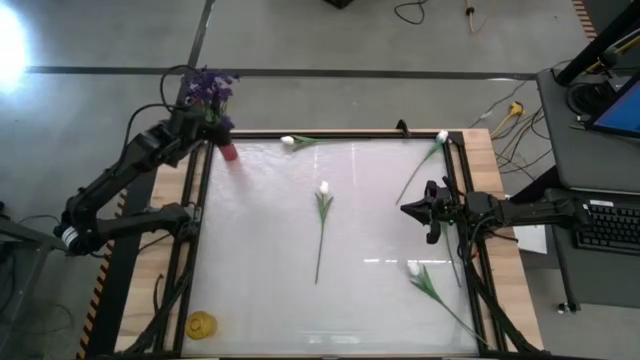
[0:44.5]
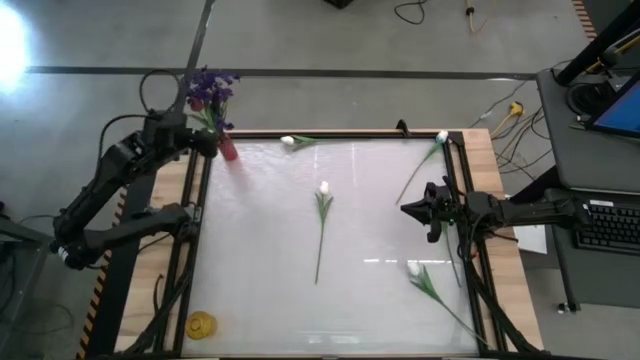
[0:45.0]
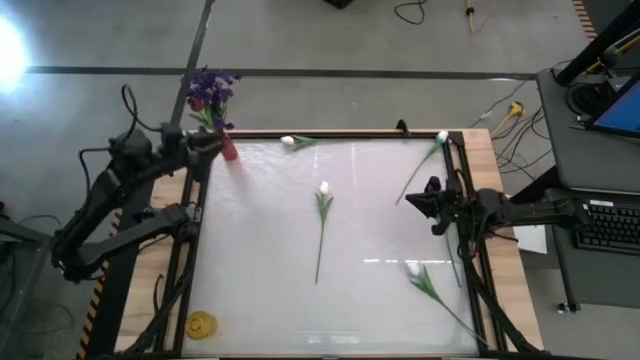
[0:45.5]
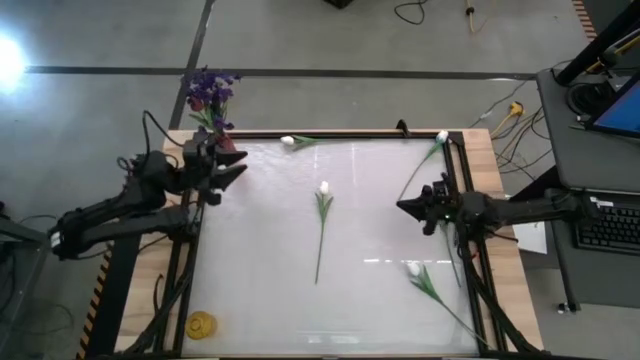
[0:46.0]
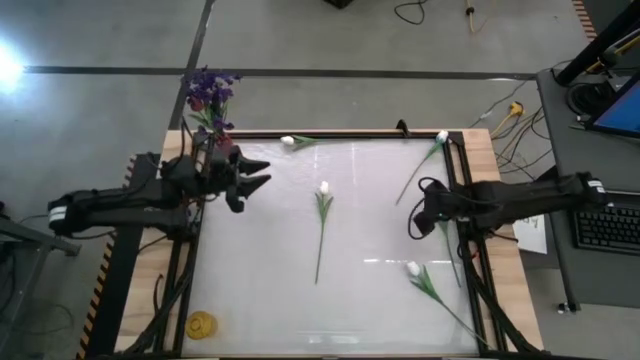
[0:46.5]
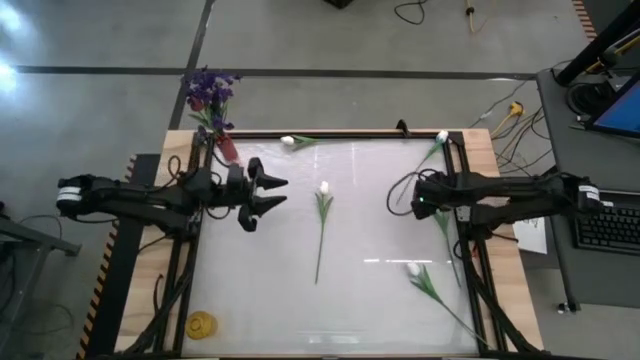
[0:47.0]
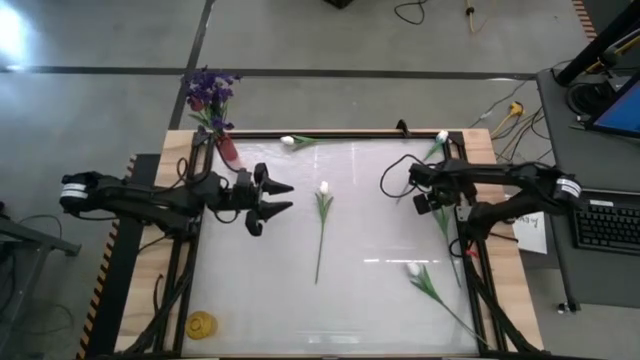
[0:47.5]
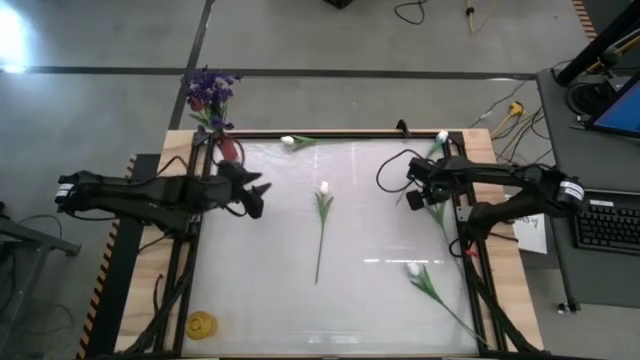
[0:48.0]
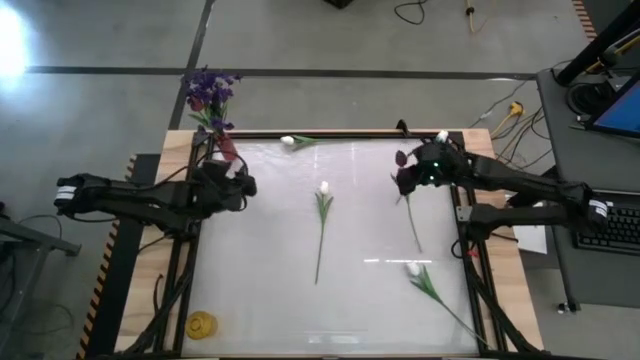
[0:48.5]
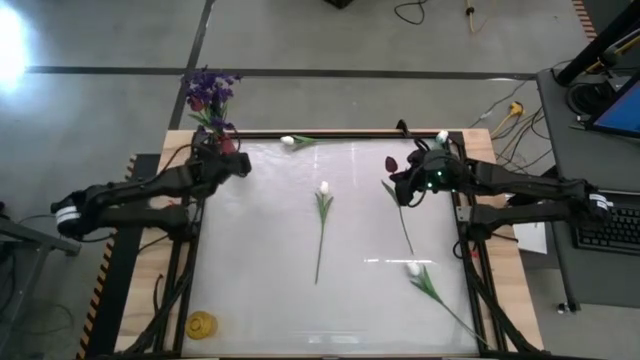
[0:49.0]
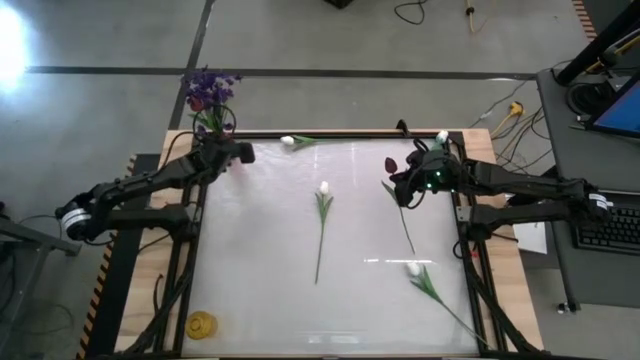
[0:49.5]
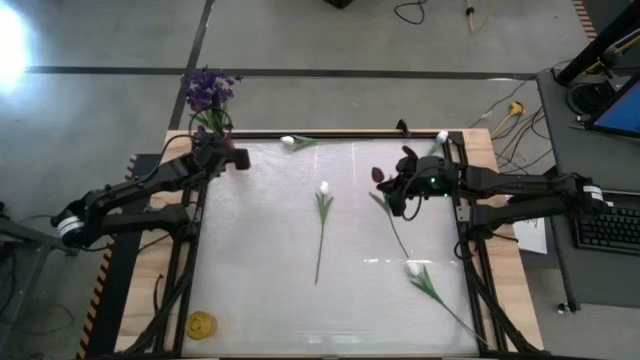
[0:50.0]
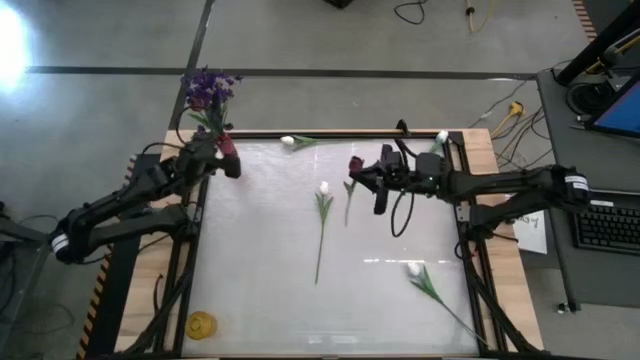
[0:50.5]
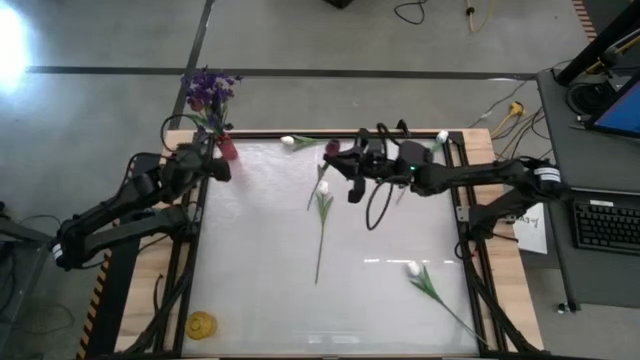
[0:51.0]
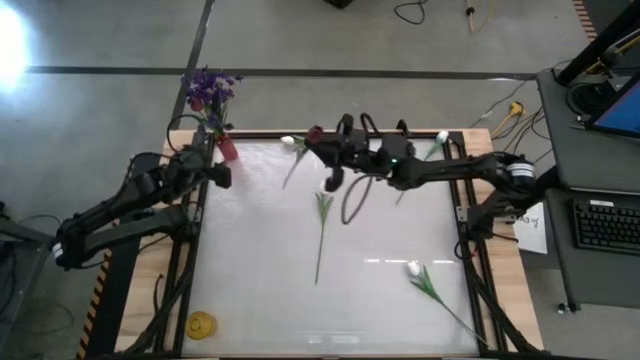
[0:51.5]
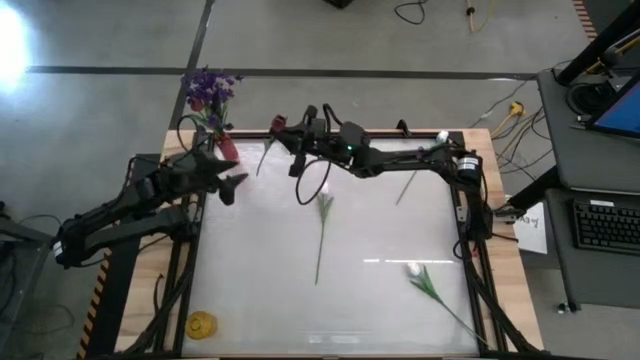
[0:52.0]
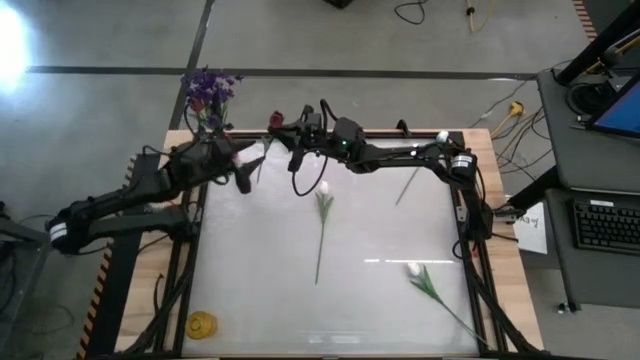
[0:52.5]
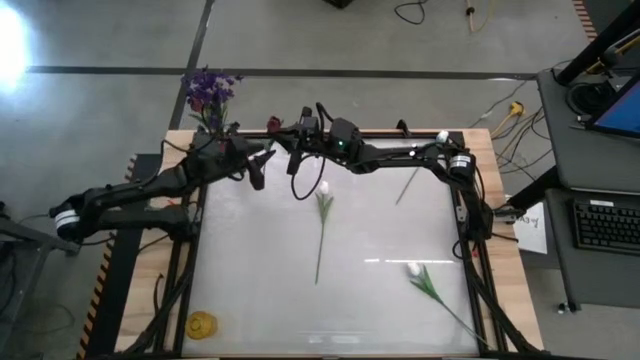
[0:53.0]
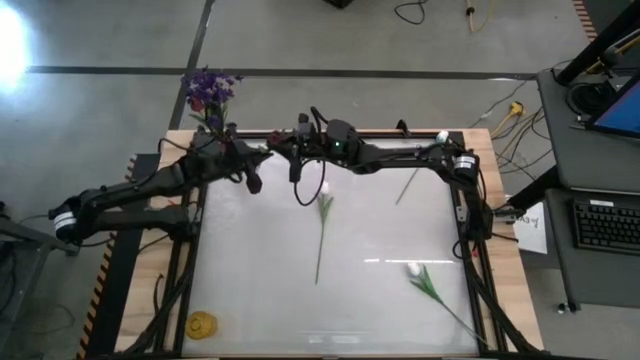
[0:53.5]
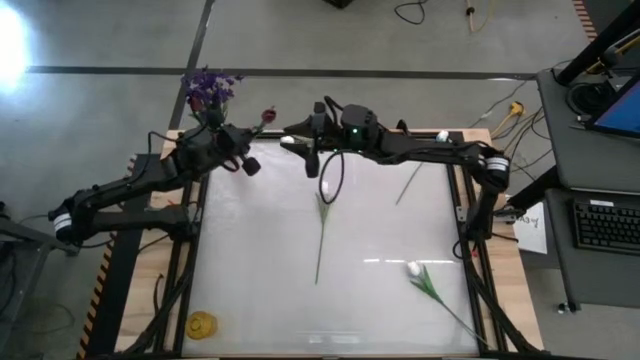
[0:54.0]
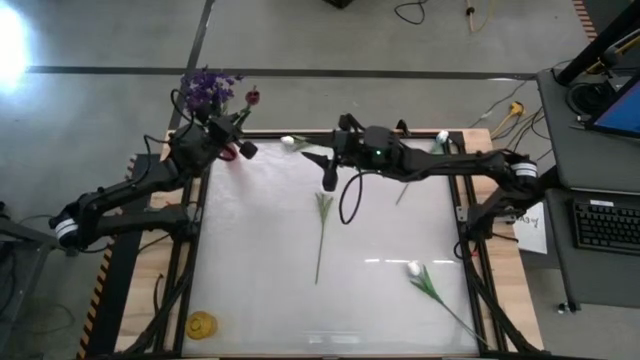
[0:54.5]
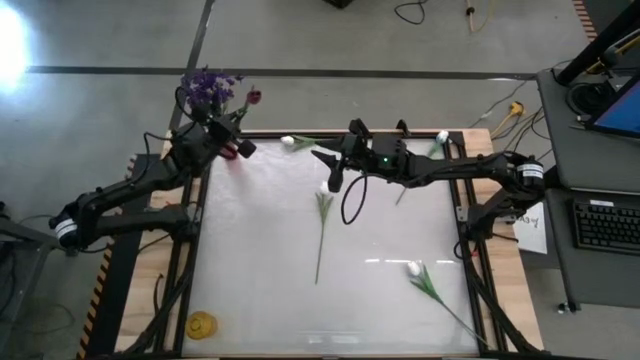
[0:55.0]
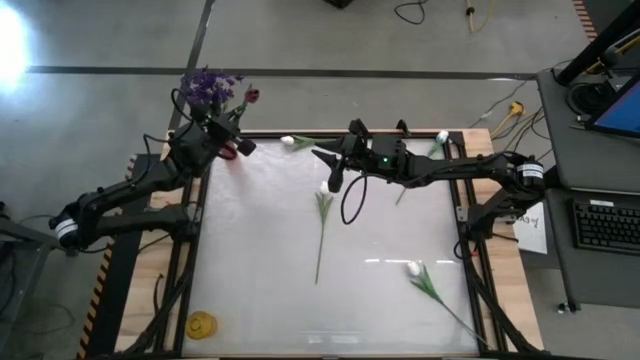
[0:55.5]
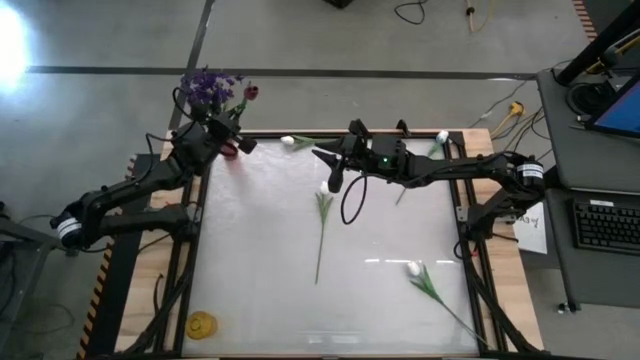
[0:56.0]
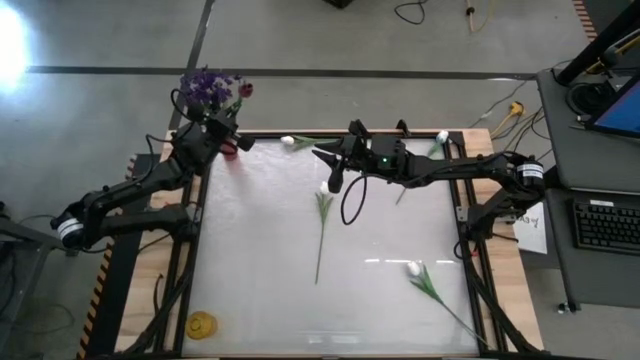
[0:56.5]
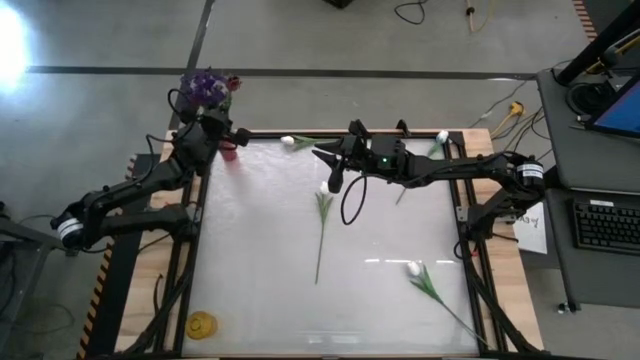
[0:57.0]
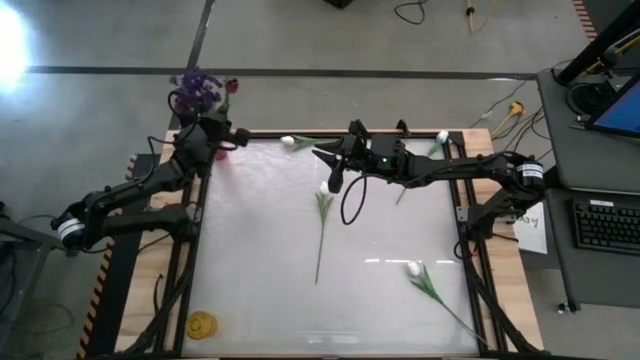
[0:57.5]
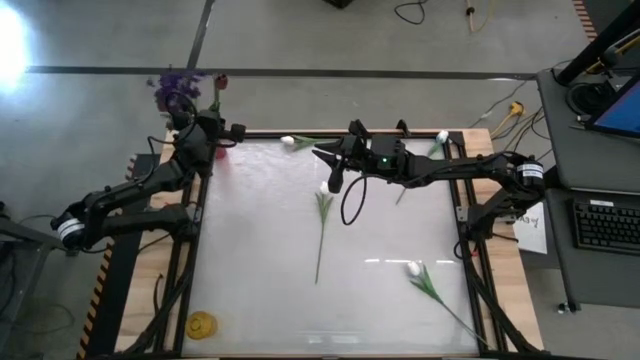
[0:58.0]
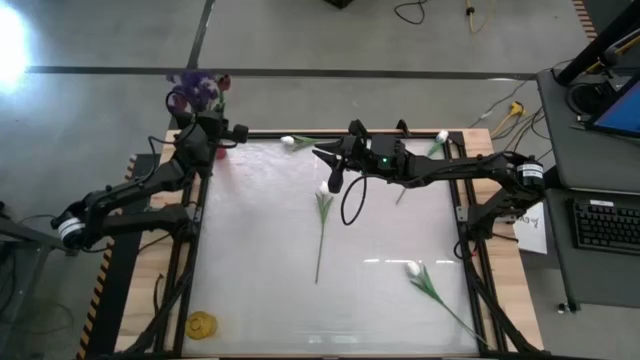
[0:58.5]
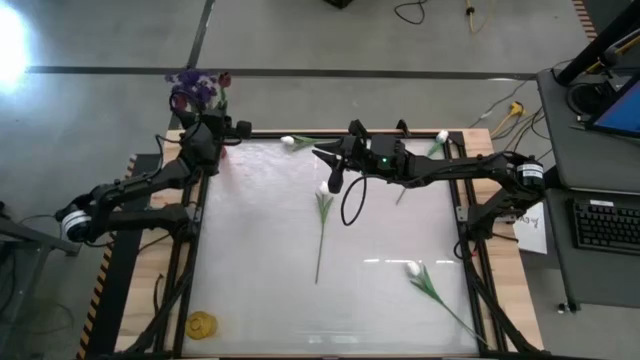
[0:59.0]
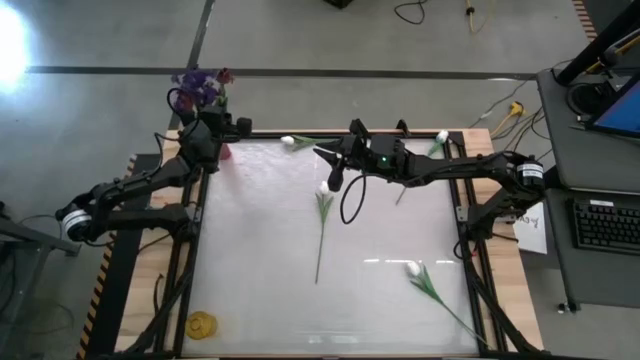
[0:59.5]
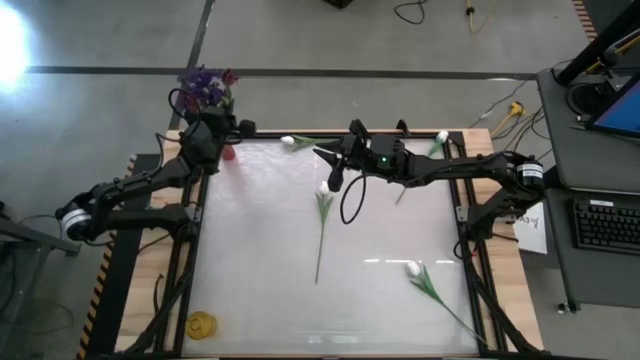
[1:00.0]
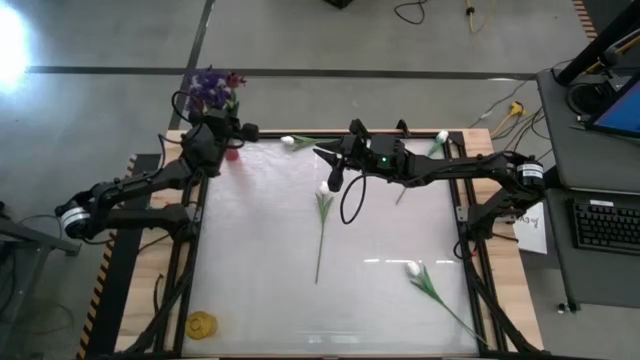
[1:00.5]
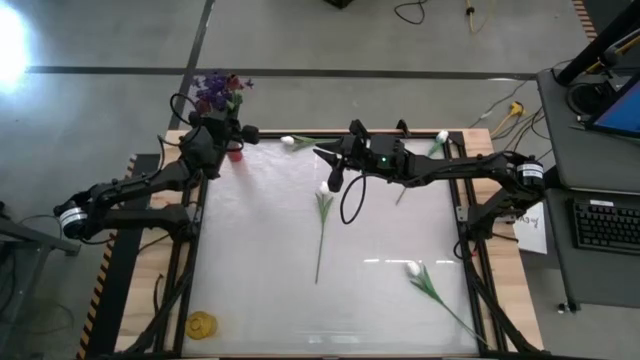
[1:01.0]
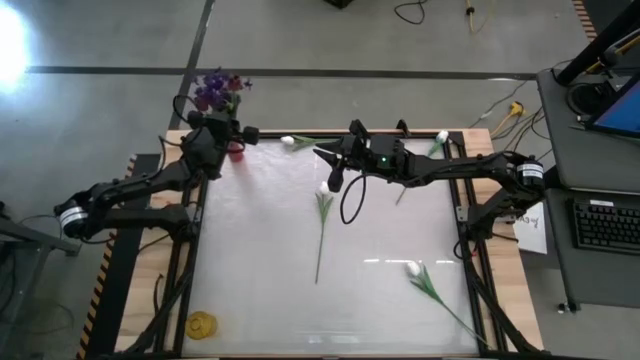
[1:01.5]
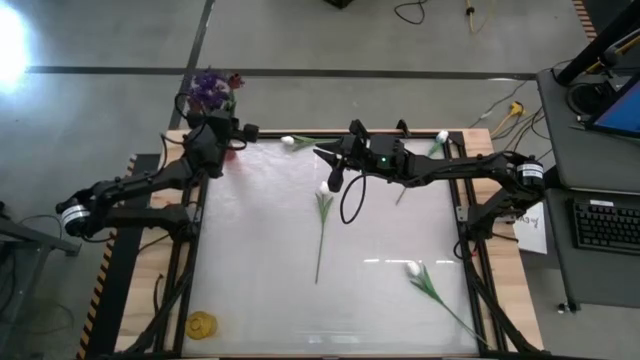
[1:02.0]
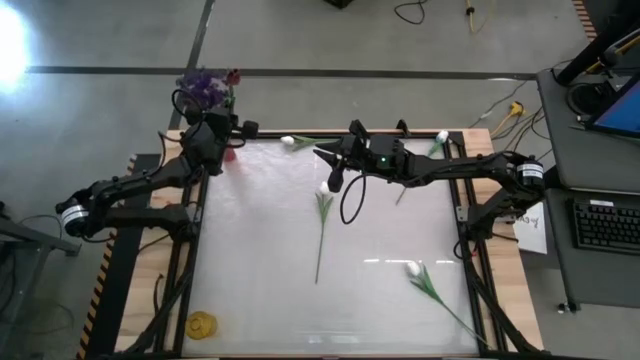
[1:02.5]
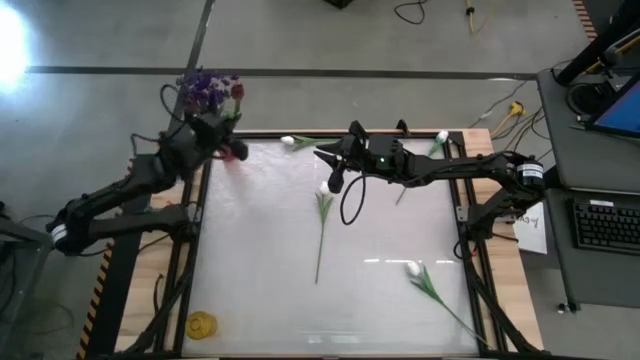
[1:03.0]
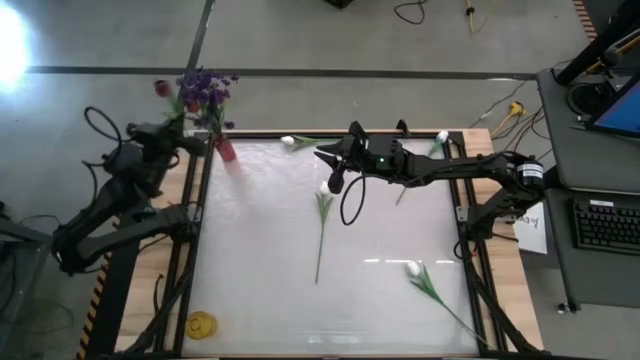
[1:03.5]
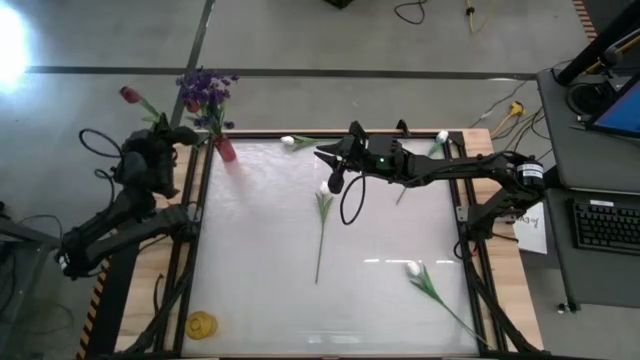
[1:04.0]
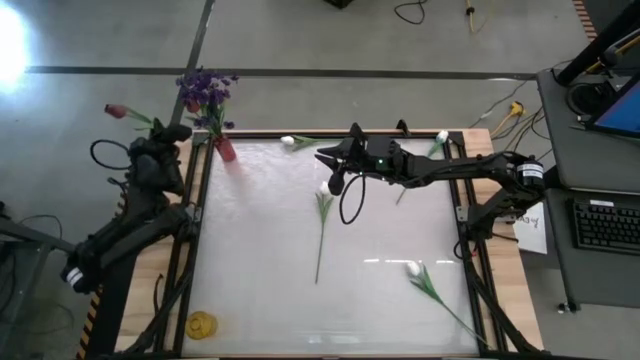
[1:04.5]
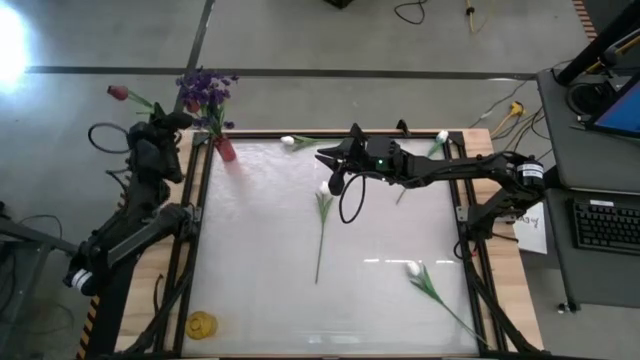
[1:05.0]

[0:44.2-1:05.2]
Task: Sort flowers into vase by color
Put the red flower into the red vase
